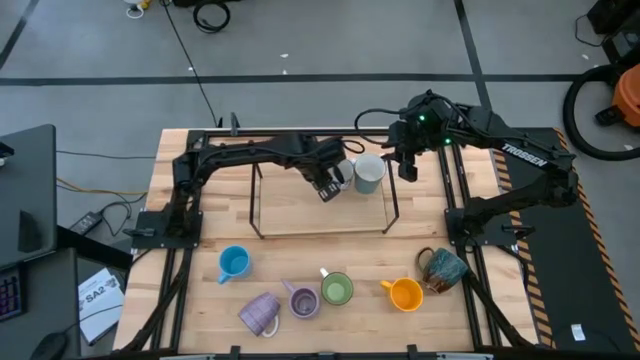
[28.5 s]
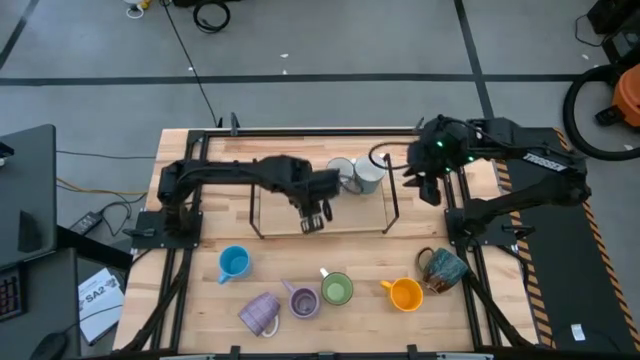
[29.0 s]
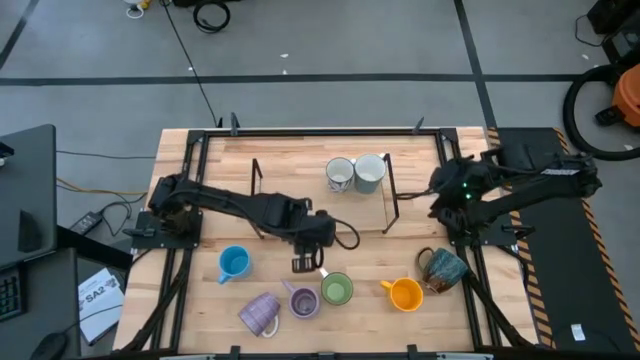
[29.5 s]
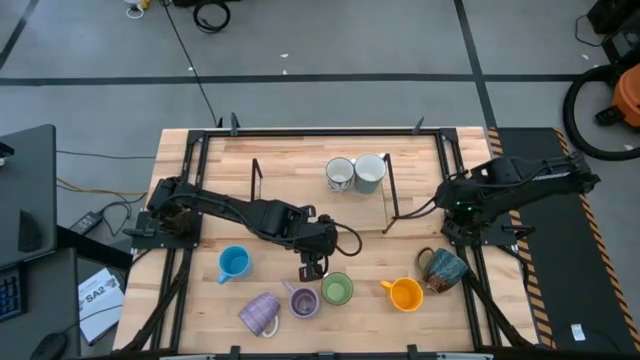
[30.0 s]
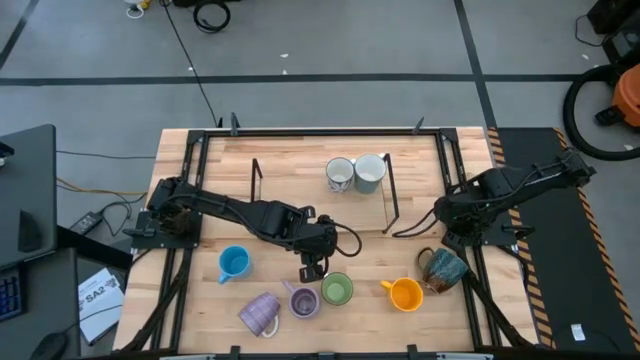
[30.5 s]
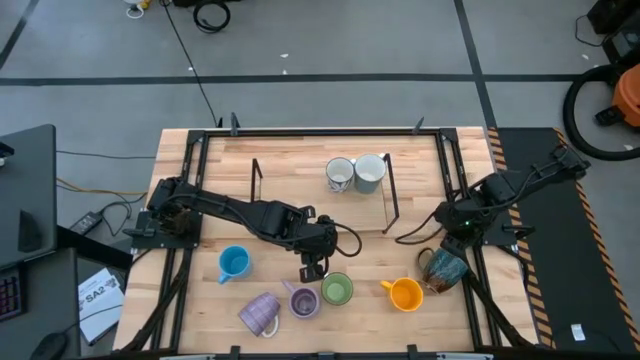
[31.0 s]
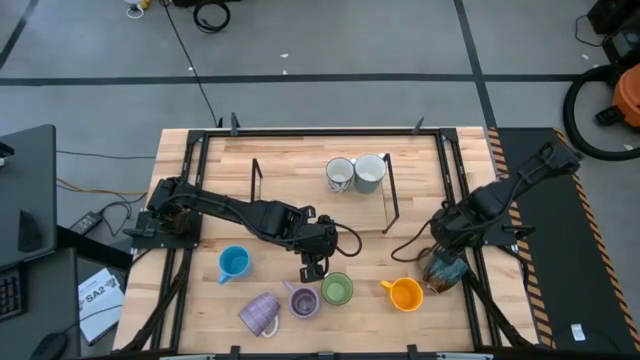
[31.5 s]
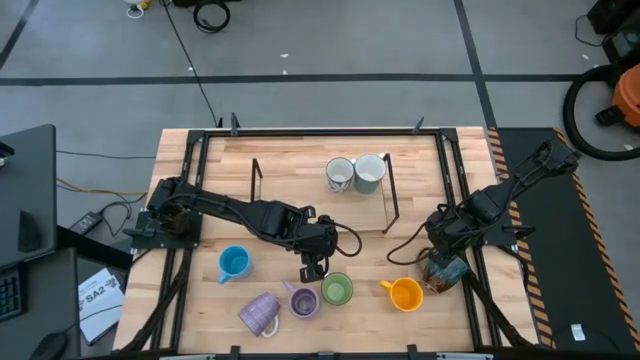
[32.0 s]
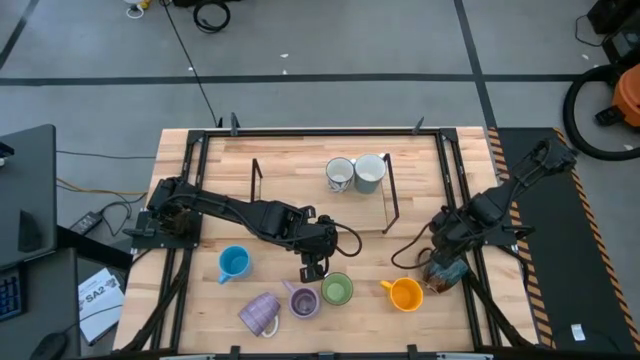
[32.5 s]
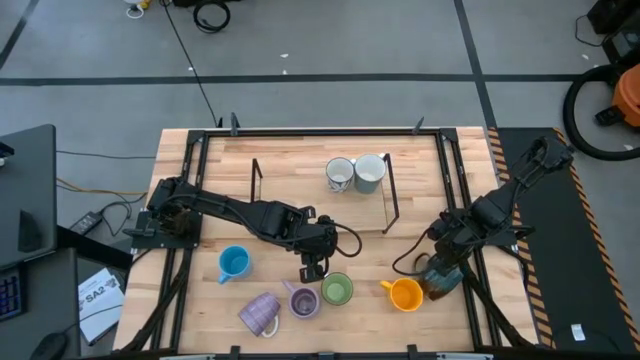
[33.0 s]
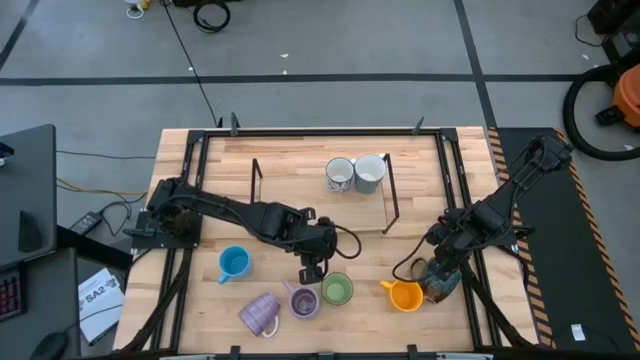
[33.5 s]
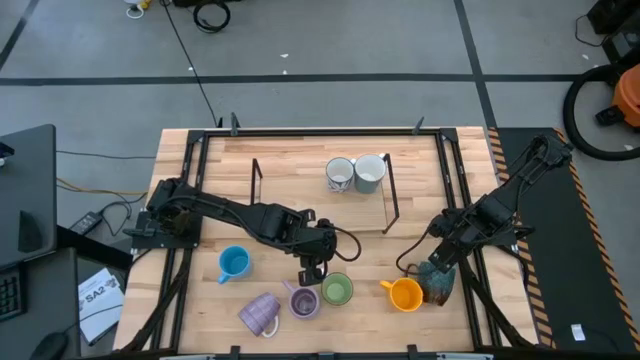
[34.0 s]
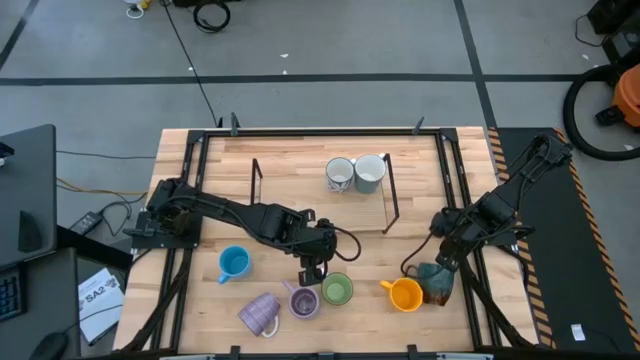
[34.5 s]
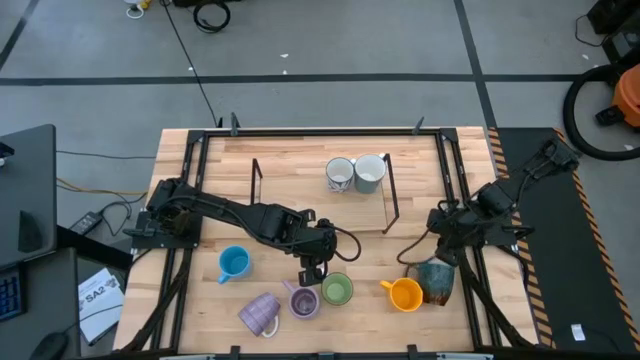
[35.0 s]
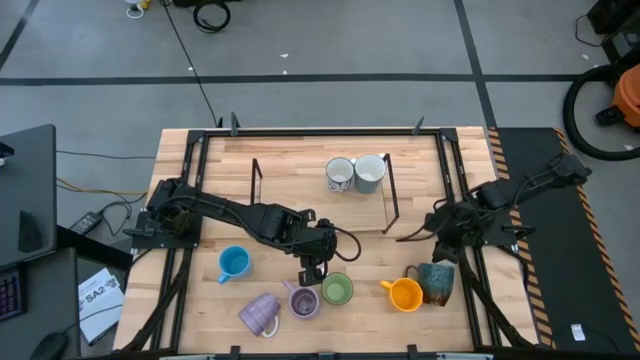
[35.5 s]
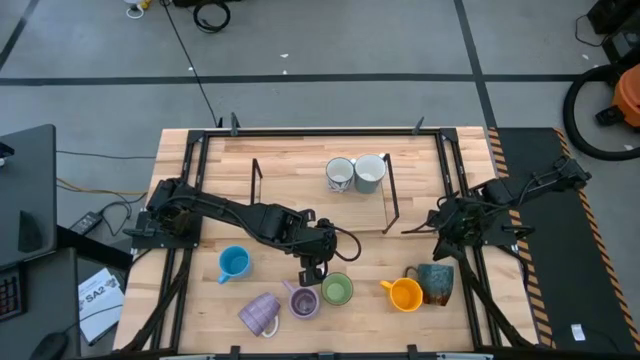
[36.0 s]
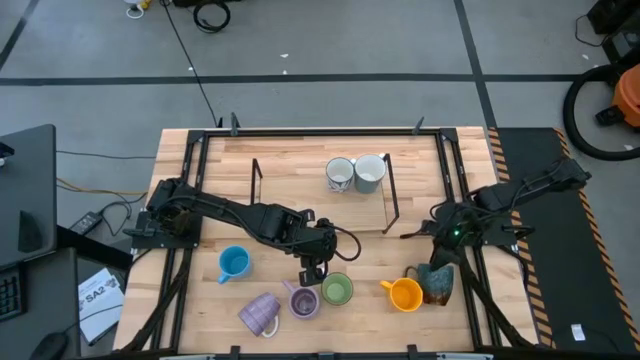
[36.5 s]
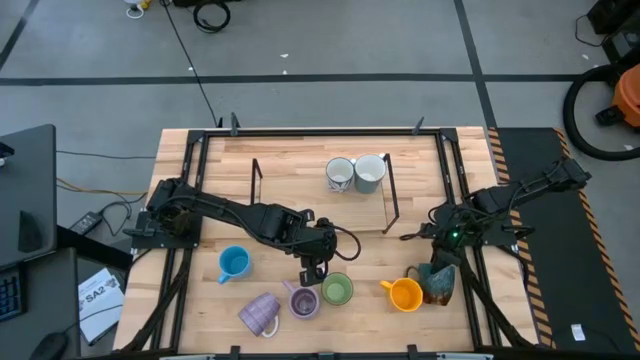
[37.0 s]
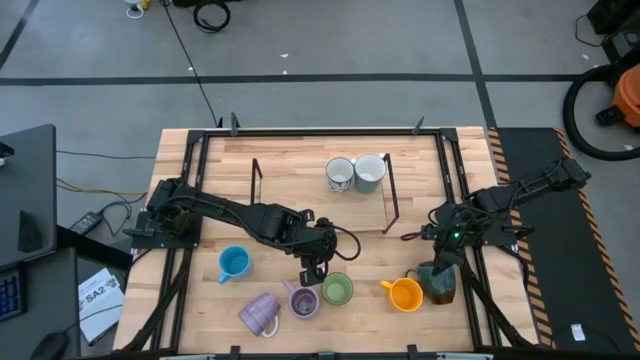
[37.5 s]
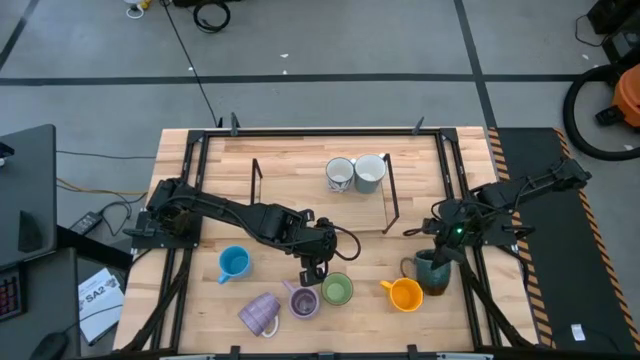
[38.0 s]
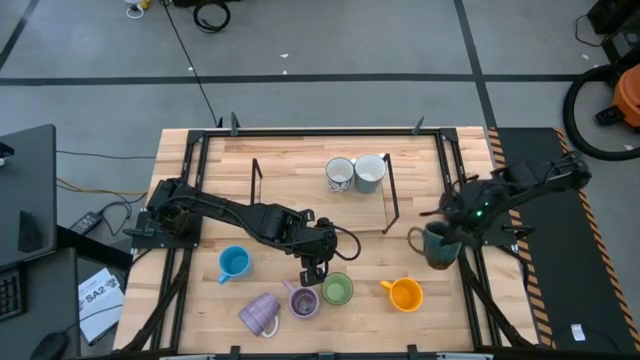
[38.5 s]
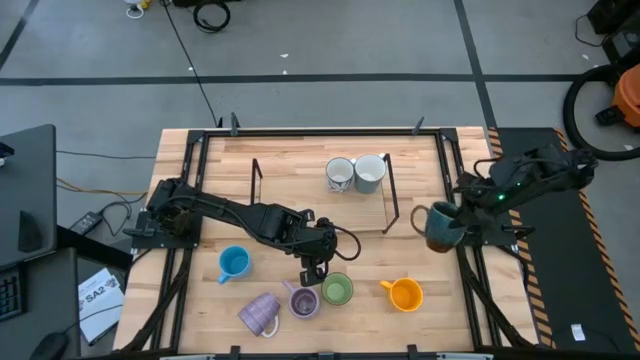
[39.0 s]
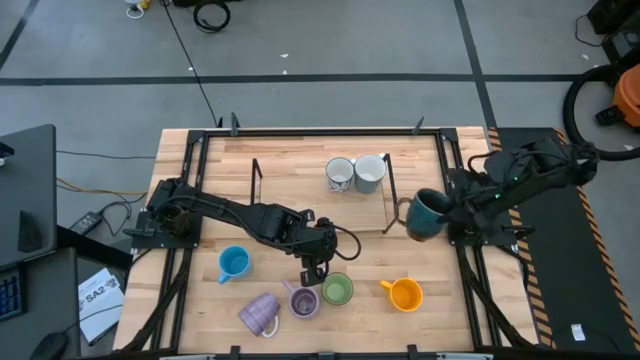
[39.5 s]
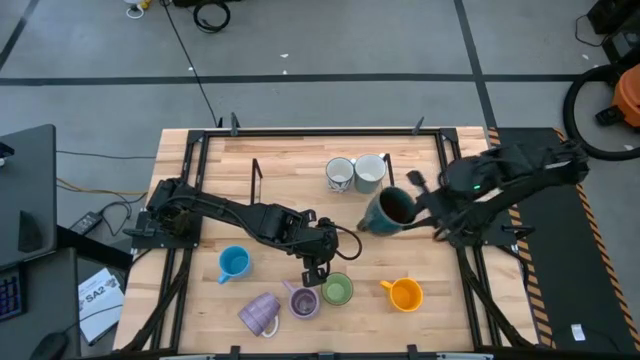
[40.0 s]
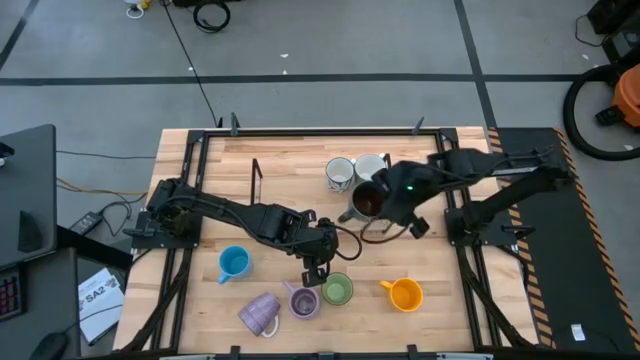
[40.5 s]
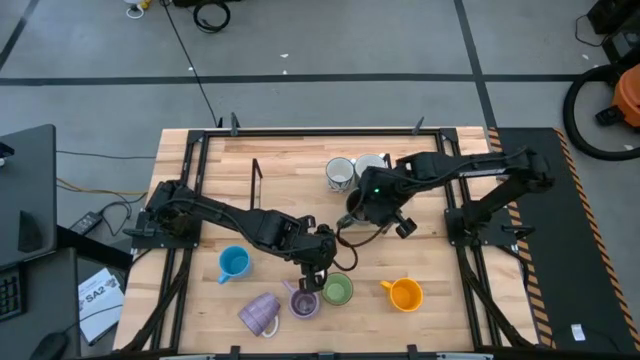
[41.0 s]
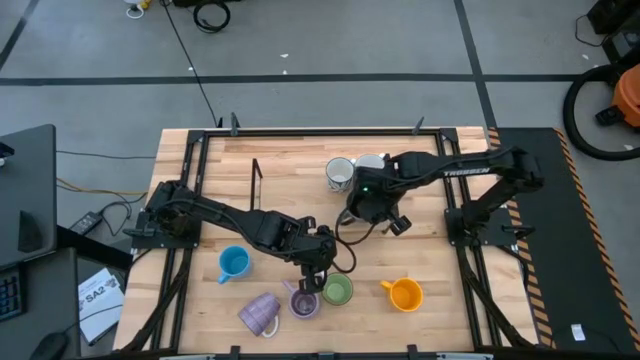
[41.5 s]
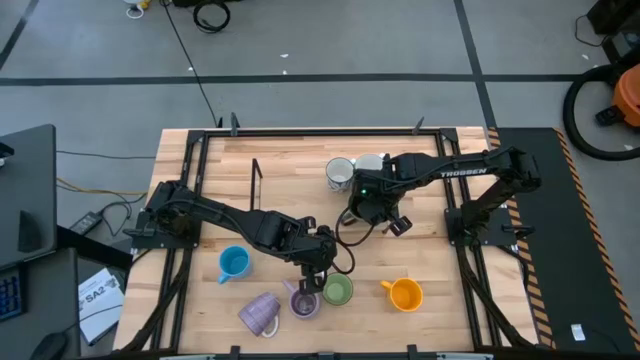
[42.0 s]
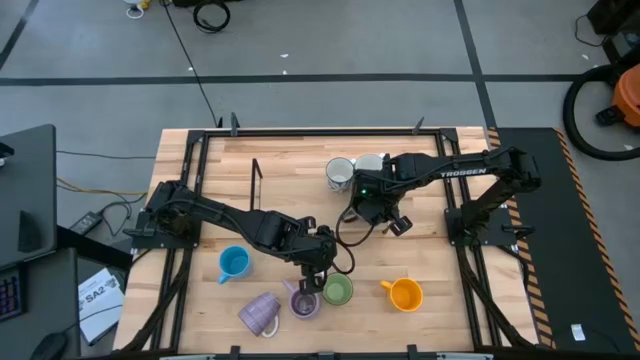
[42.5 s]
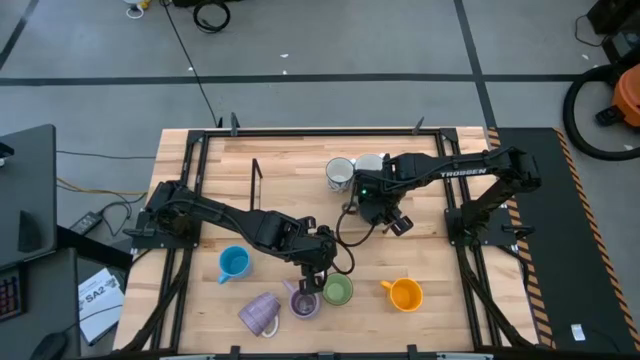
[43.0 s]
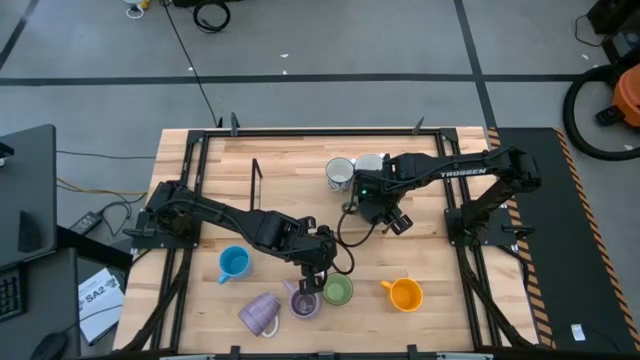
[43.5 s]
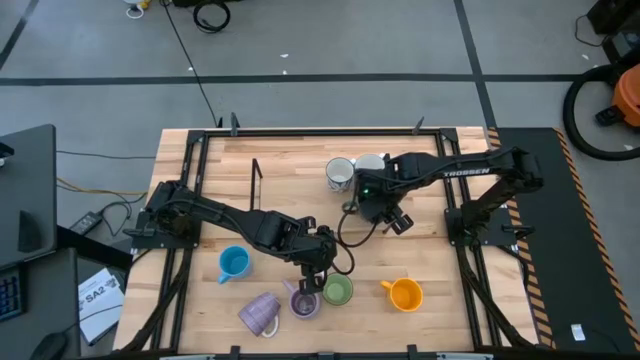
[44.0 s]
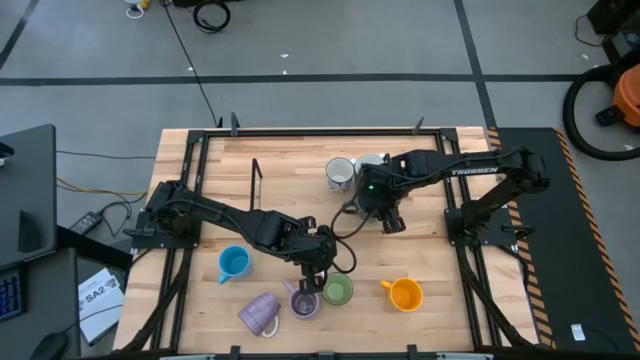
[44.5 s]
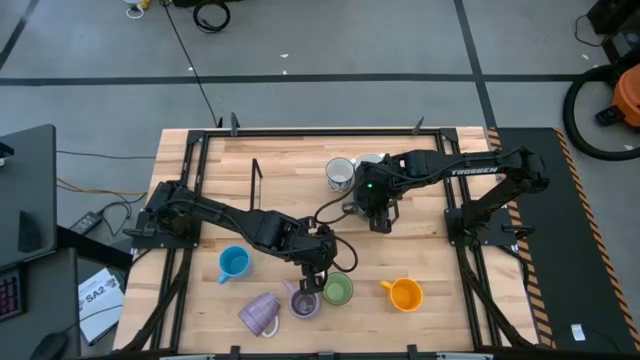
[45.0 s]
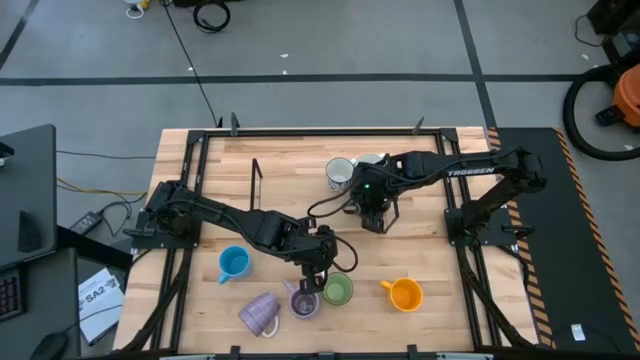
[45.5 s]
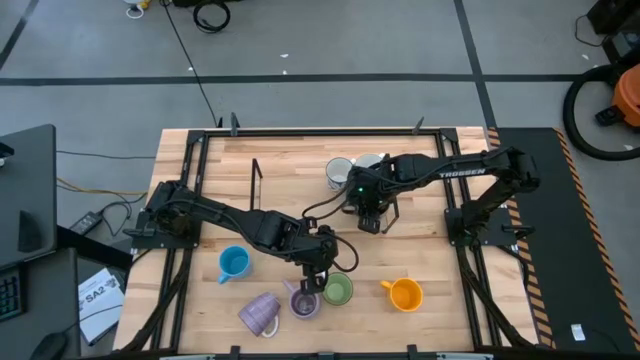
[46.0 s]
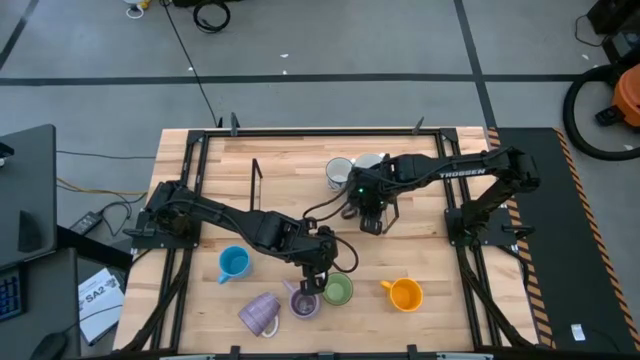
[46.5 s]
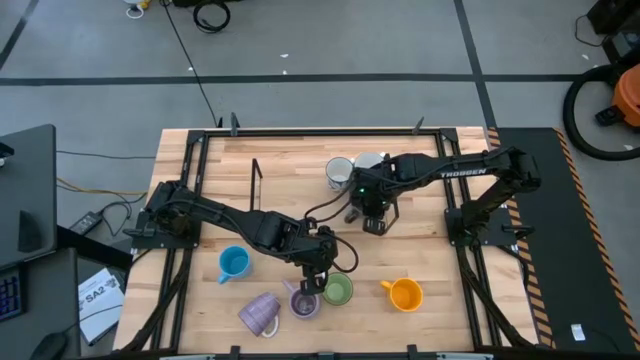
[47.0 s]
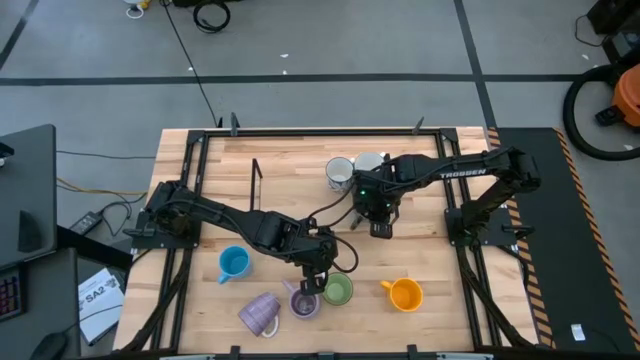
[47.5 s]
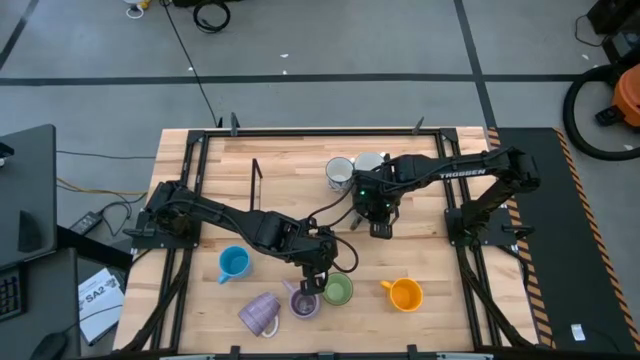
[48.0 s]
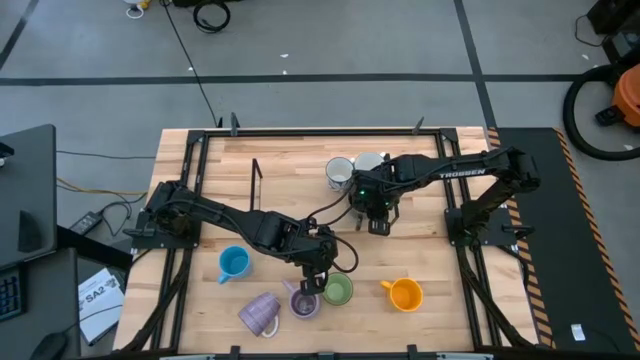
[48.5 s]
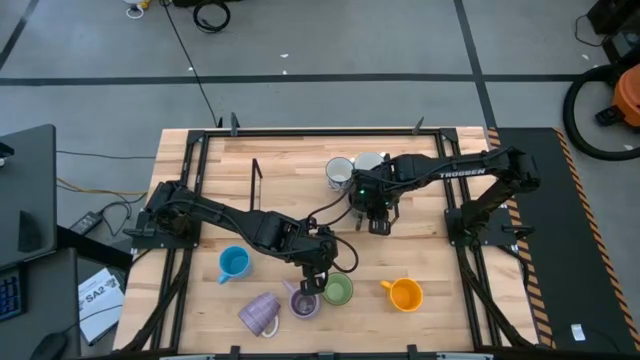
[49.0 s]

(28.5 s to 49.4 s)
Task: Place coffee mugs
Align the brown mug with the light blue mug on the shelf
